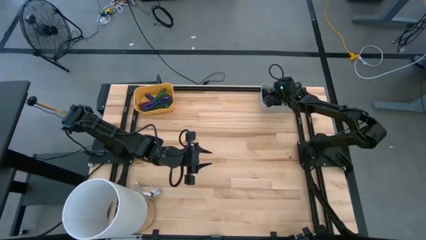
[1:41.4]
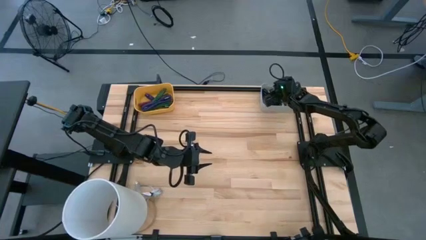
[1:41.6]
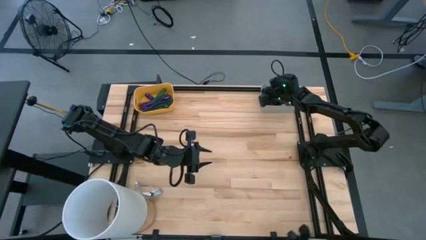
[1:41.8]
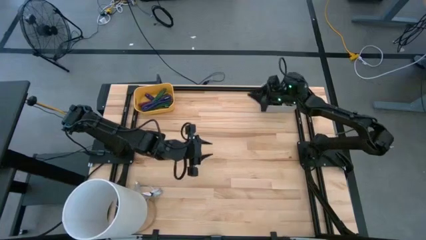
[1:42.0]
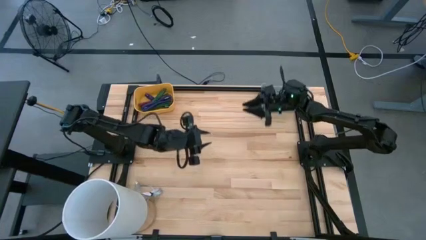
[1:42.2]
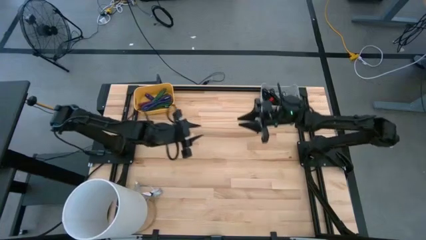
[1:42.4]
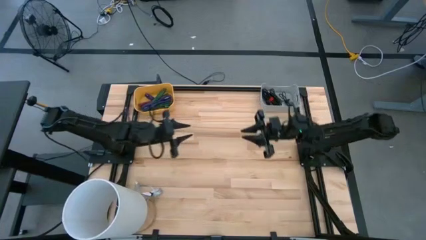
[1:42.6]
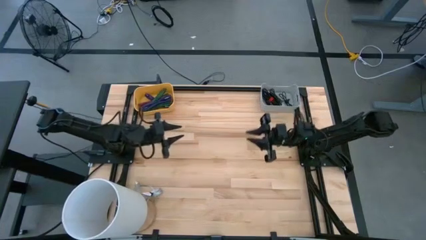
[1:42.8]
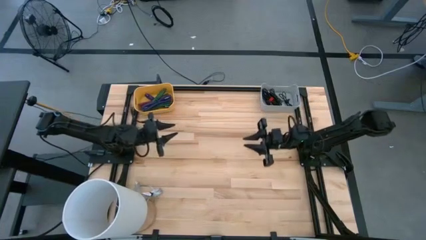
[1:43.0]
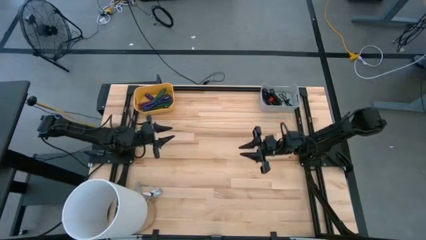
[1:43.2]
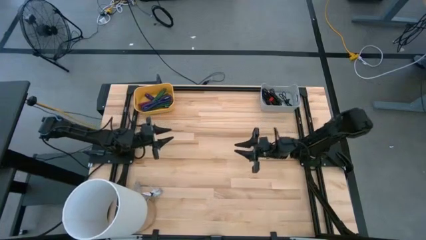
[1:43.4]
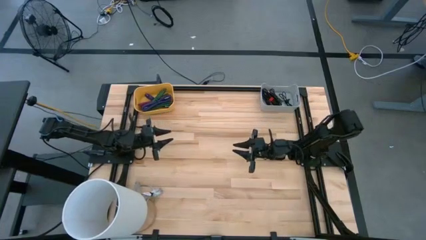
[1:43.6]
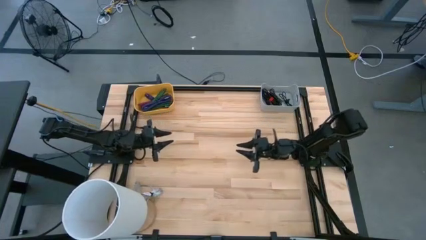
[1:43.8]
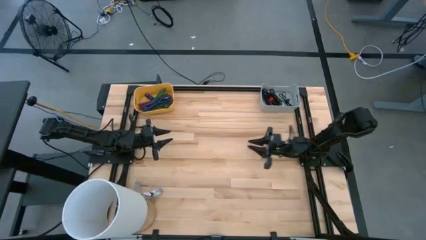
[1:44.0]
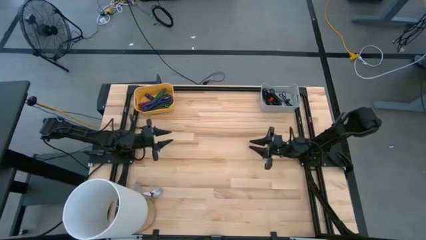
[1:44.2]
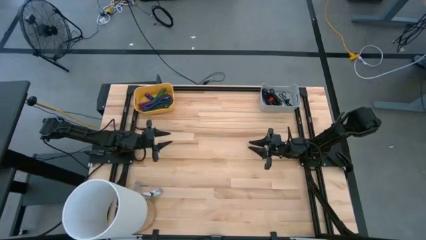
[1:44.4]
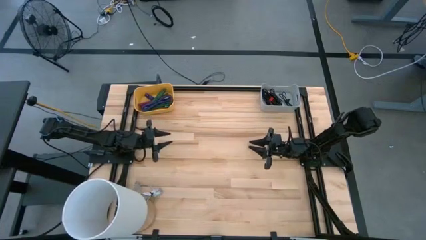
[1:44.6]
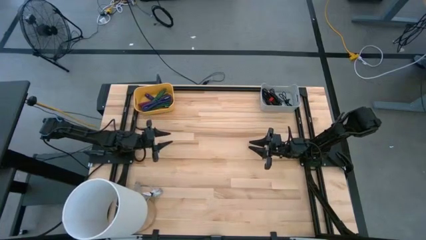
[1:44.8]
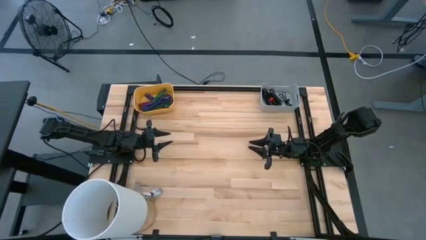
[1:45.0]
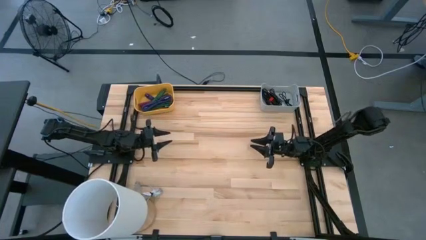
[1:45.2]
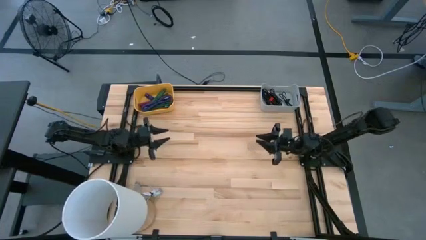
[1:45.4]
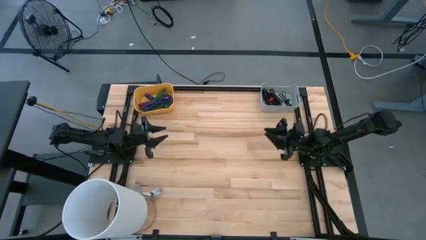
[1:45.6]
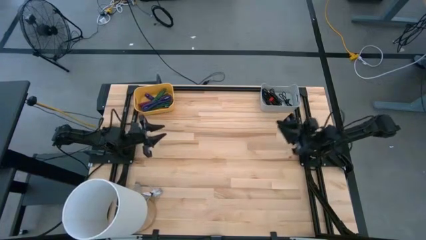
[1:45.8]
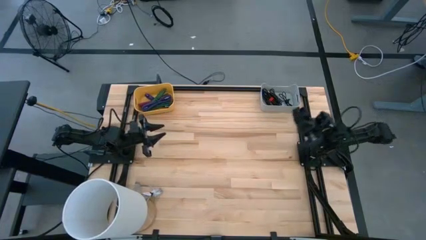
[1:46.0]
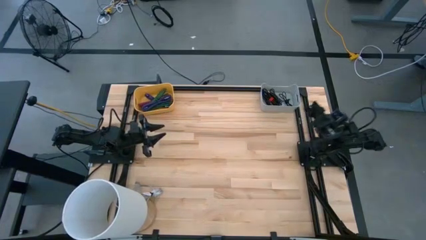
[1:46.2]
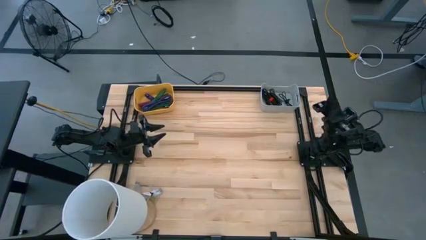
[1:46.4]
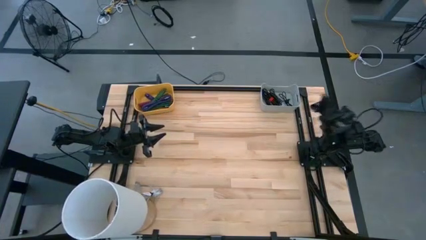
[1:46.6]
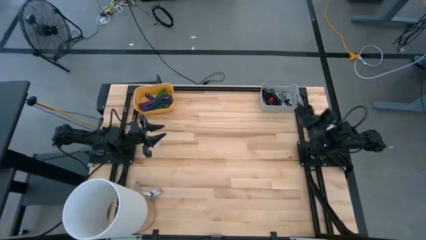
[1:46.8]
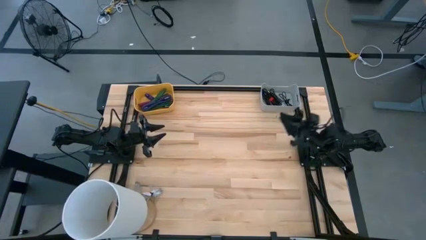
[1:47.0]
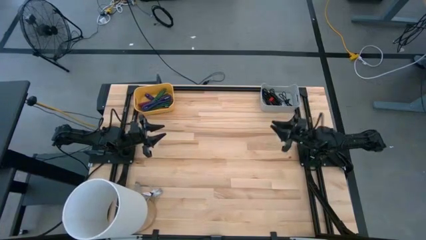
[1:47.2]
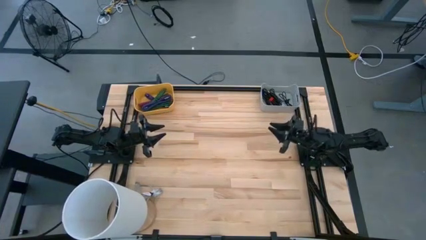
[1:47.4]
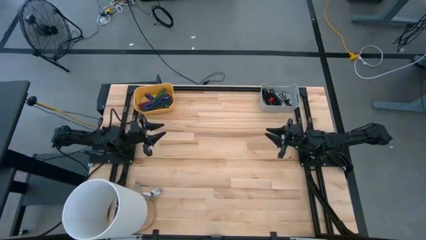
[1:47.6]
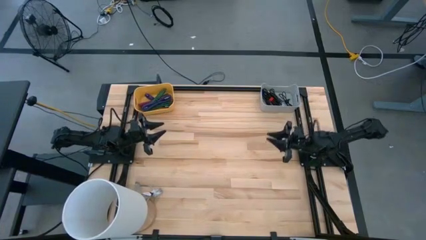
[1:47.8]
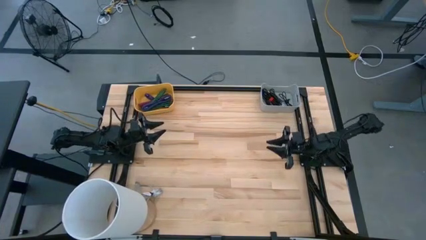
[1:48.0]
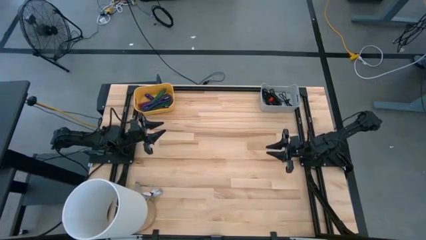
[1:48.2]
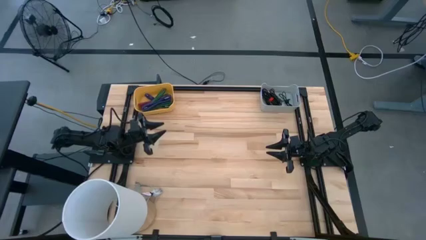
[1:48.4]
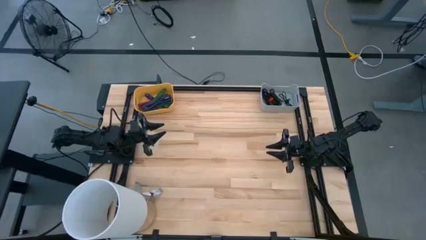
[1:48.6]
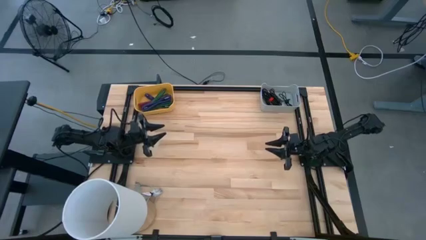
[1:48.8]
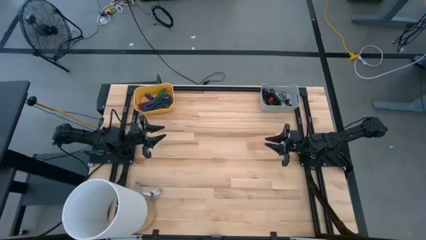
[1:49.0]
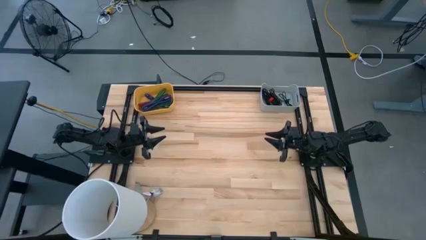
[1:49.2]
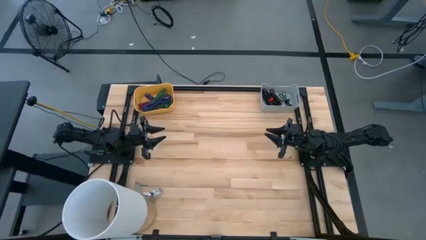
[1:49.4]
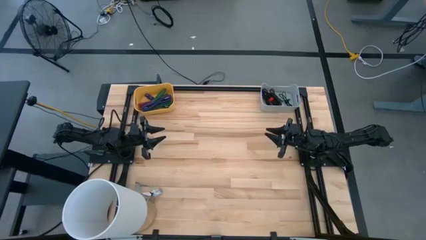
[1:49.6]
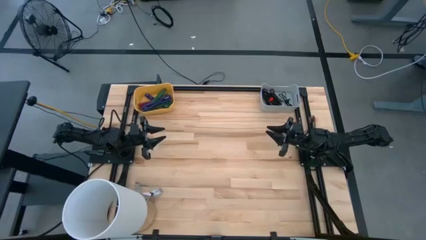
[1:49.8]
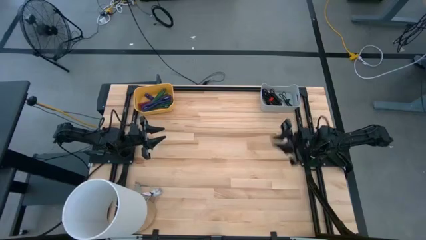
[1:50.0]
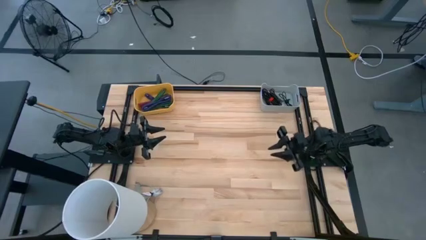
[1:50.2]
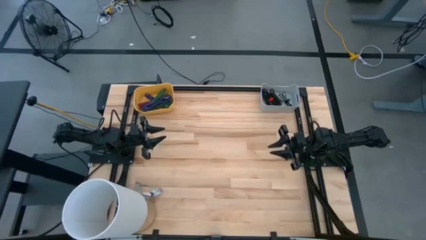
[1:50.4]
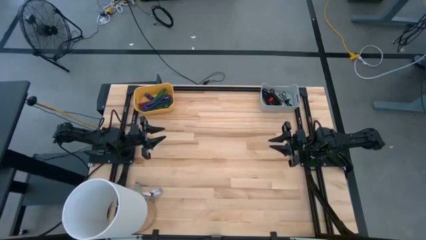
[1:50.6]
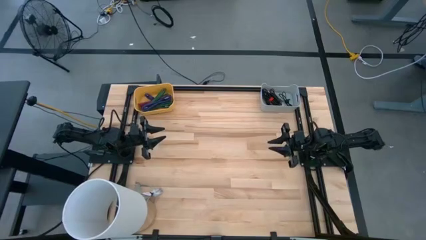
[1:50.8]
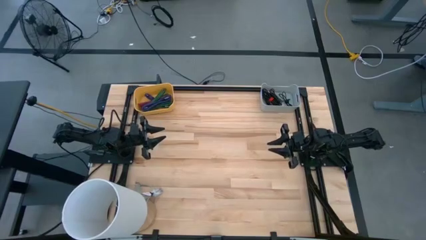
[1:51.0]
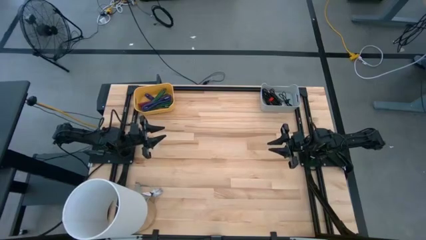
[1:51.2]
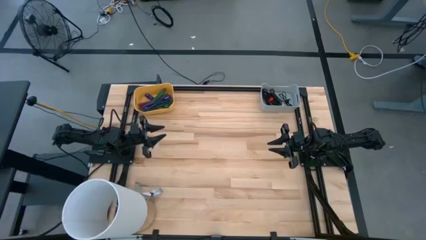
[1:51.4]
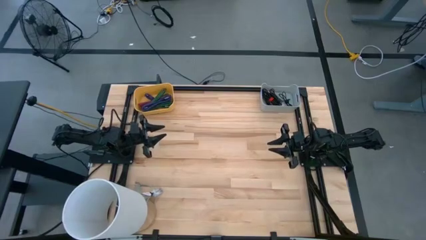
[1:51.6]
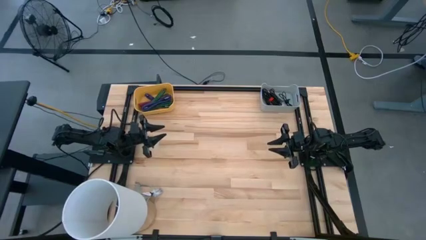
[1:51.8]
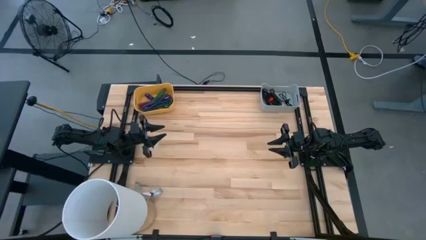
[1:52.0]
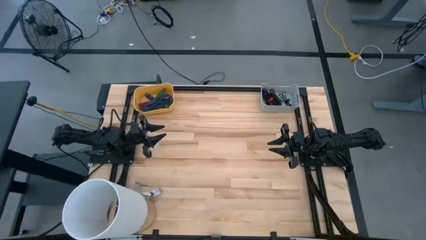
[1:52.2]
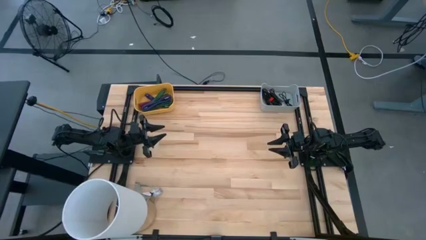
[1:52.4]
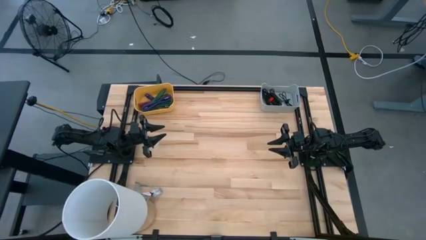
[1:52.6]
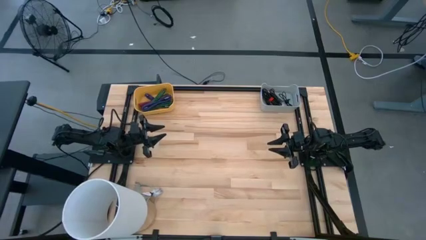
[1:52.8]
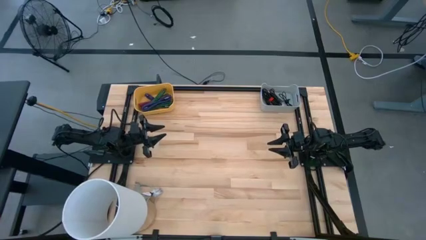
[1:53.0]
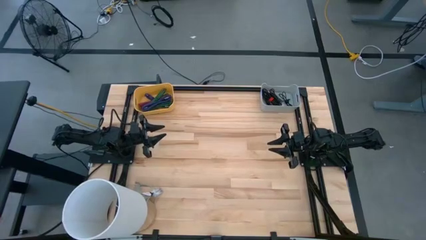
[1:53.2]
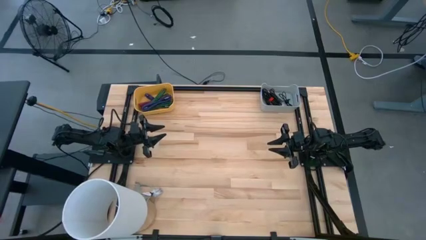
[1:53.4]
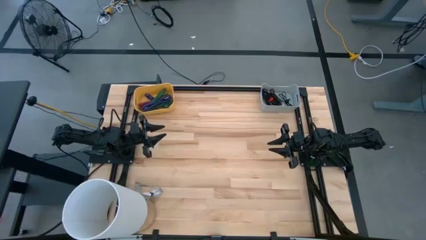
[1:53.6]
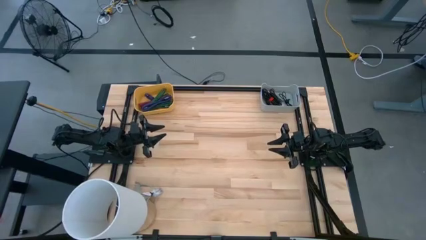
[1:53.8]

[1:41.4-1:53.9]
Task: Pick & Place USB Port
Return to Home Position

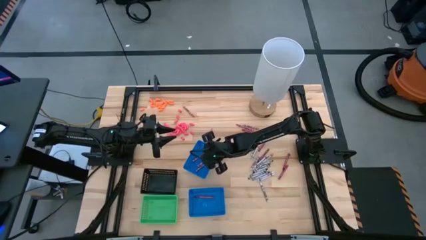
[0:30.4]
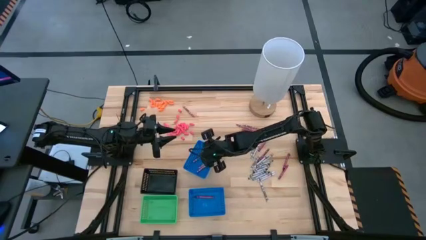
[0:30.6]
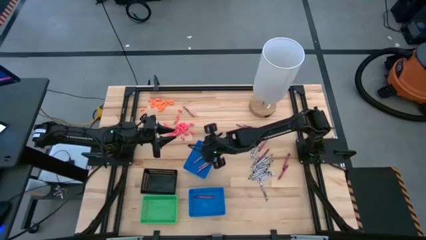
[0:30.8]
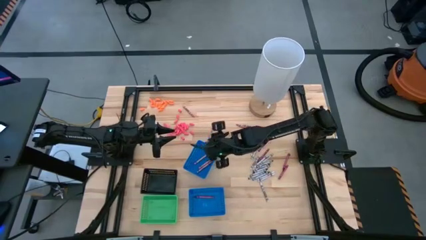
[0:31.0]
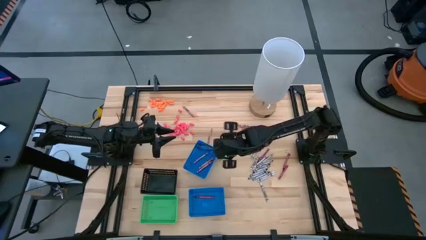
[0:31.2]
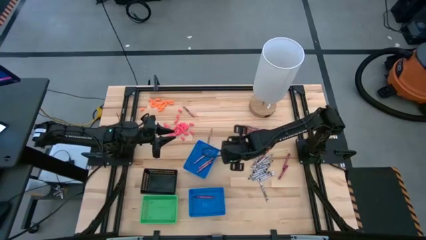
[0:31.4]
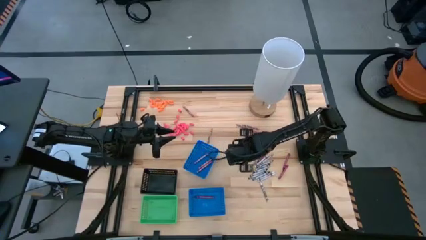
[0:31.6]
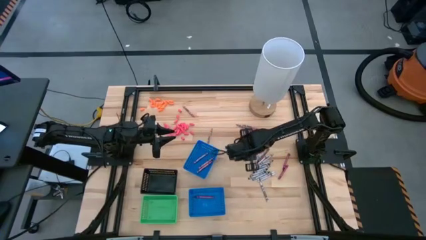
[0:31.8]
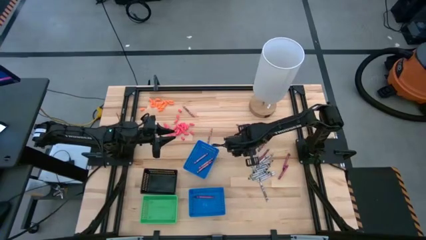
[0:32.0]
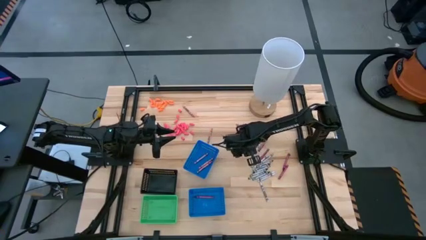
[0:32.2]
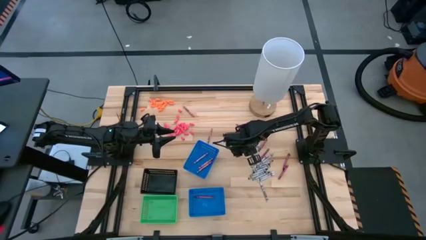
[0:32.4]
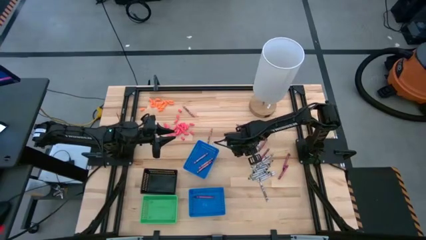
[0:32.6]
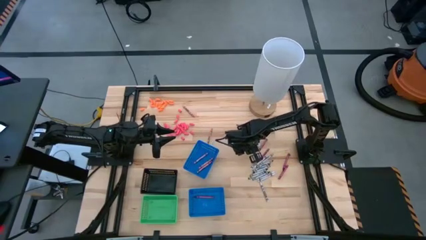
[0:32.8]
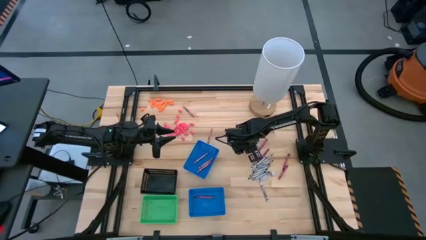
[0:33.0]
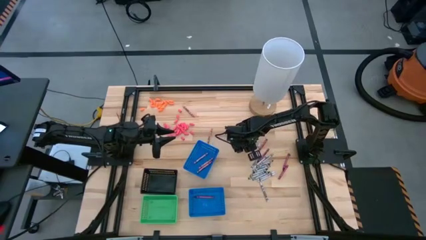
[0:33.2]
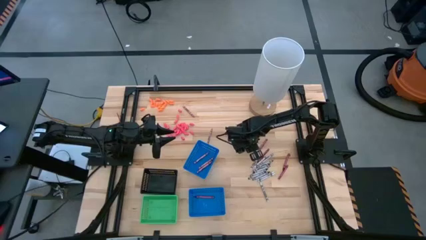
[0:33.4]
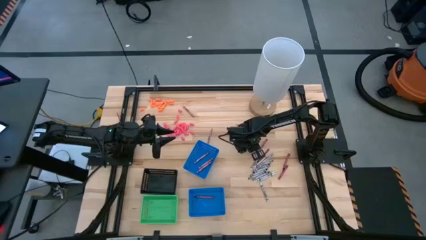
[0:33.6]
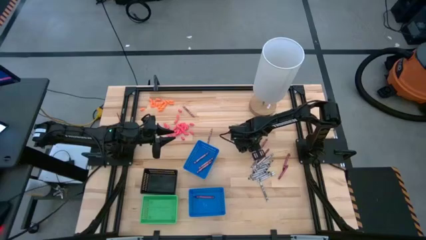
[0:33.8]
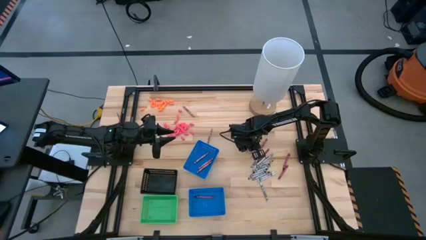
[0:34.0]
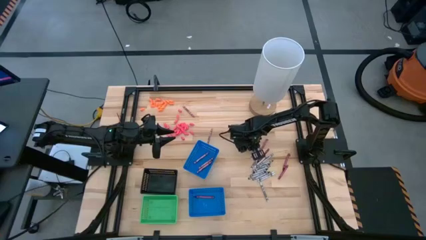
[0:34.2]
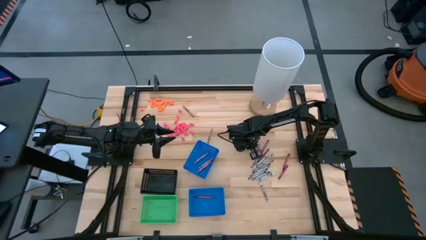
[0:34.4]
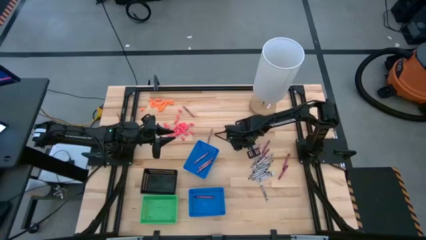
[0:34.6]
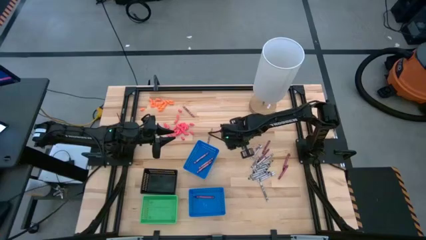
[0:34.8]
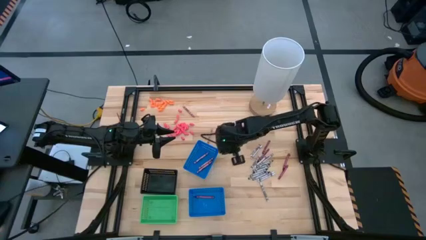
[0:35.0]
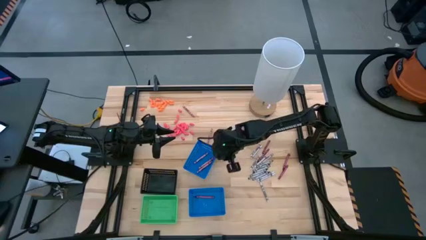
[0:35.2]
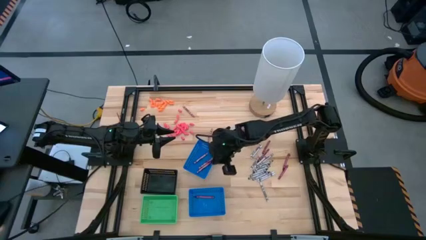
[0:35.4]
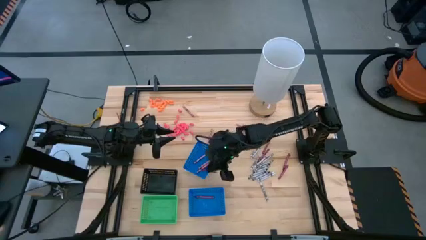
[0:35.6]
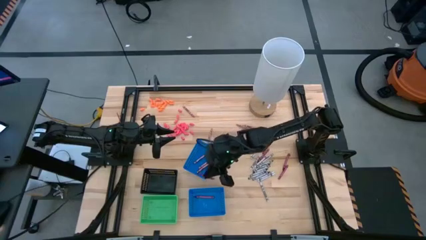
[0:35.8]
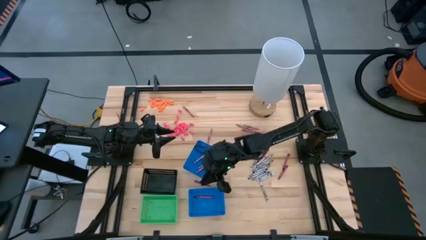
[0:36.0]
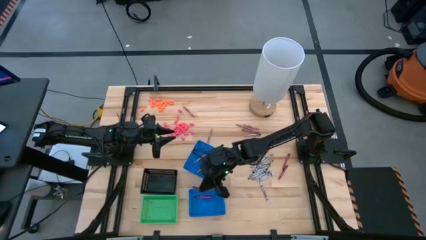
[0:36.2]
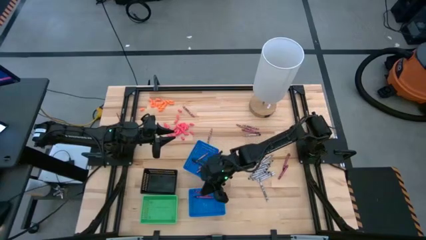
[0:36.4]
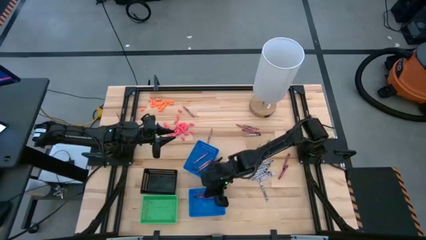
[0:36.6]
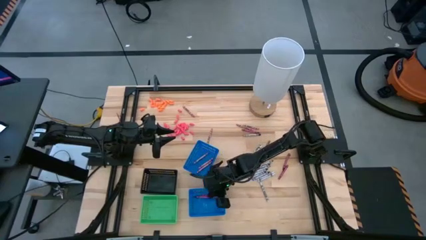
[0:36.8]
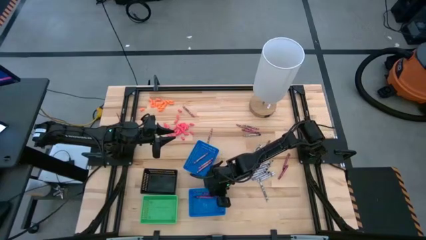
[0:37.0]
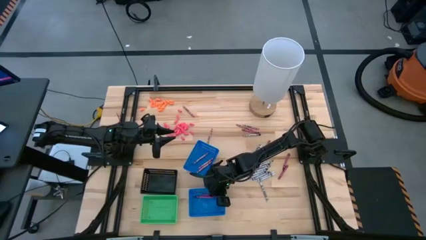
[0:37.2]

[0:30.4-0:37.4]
Task: Sort crayons
Put the violet crayon into the bottom blue bin
